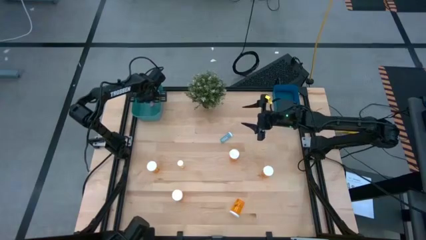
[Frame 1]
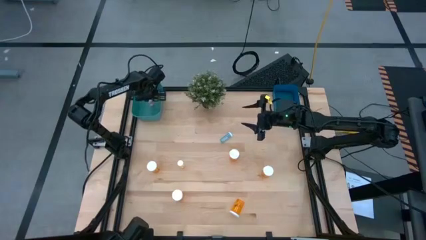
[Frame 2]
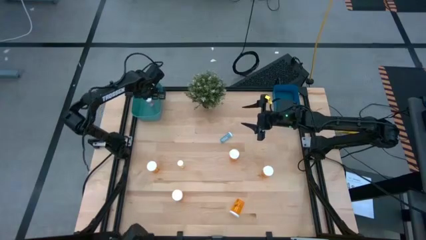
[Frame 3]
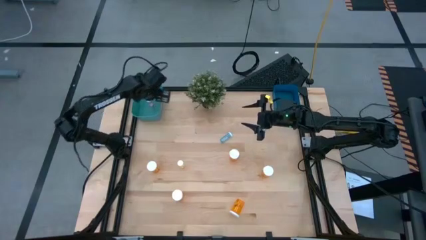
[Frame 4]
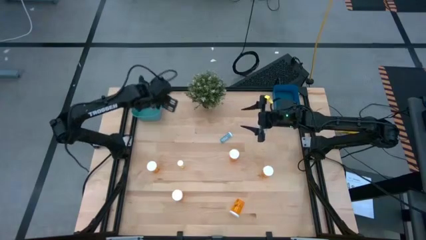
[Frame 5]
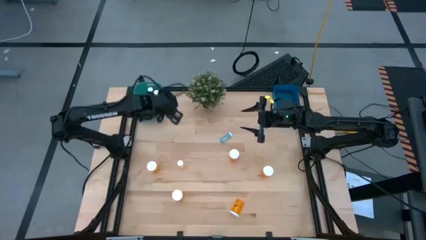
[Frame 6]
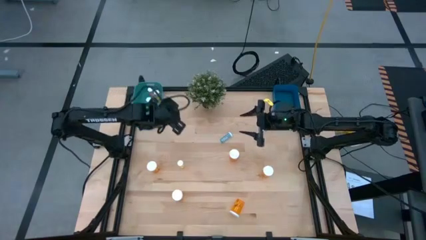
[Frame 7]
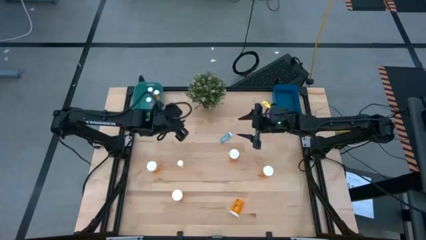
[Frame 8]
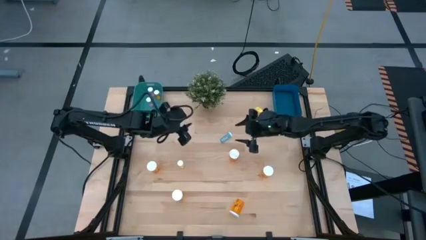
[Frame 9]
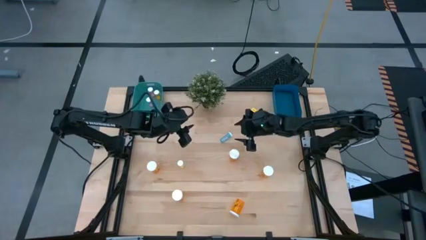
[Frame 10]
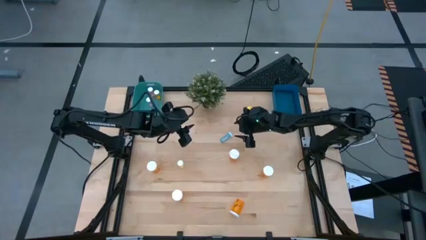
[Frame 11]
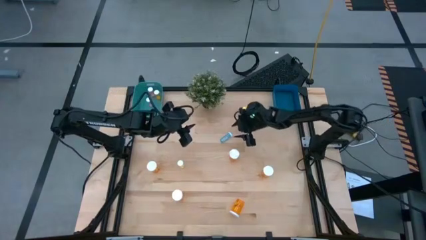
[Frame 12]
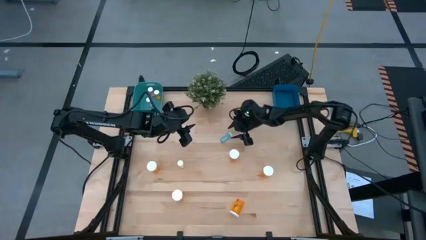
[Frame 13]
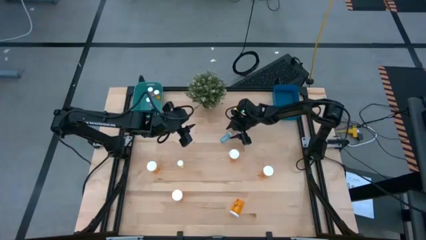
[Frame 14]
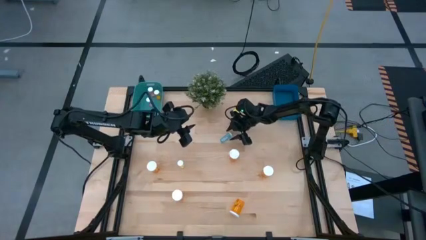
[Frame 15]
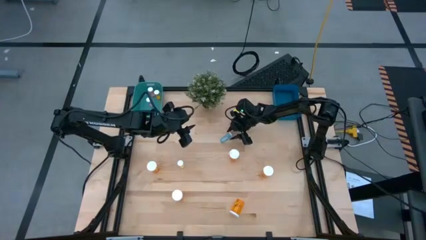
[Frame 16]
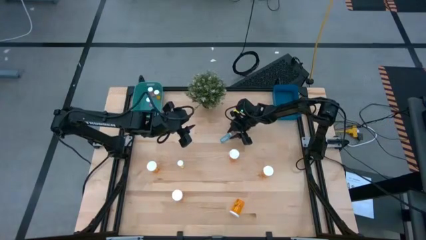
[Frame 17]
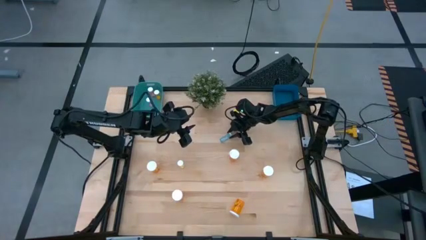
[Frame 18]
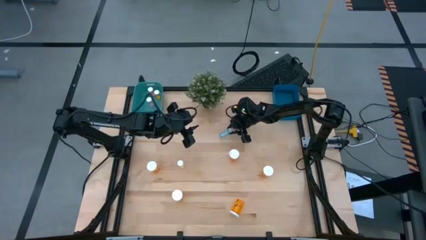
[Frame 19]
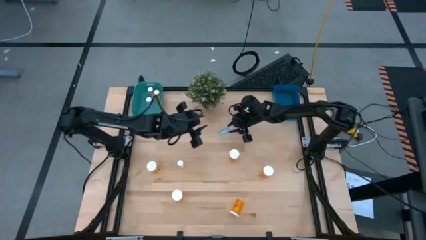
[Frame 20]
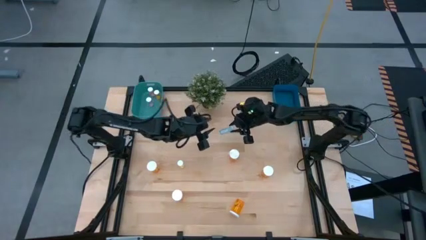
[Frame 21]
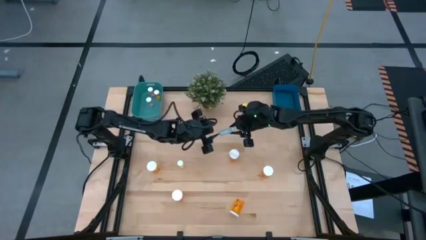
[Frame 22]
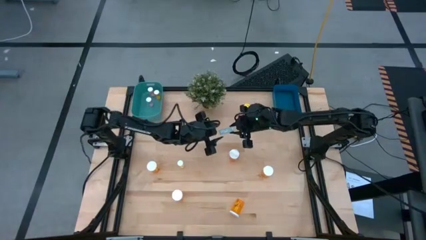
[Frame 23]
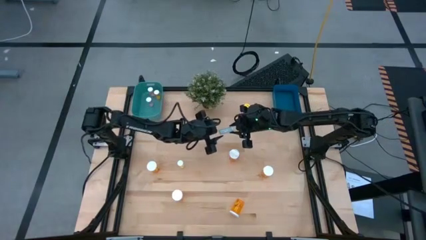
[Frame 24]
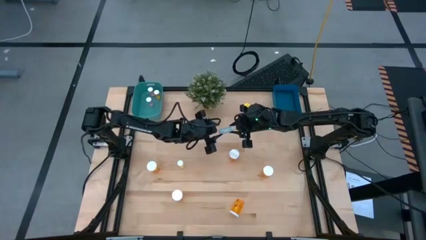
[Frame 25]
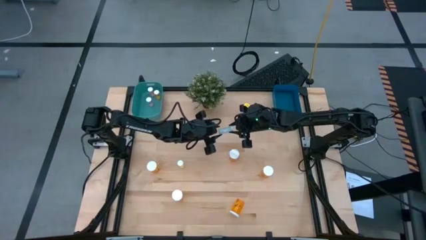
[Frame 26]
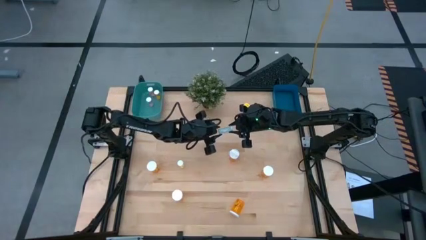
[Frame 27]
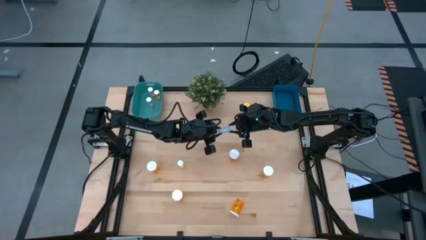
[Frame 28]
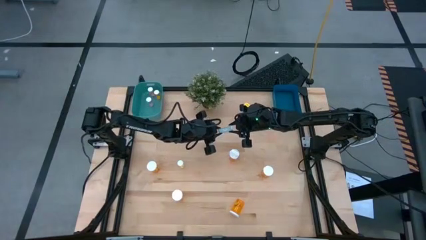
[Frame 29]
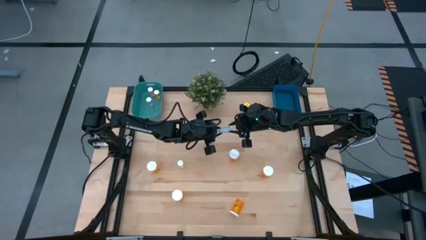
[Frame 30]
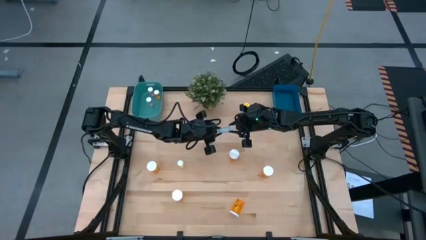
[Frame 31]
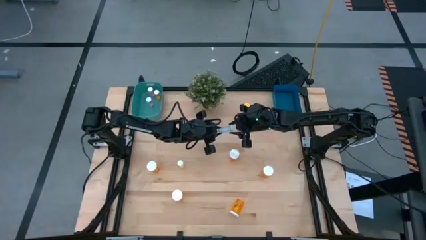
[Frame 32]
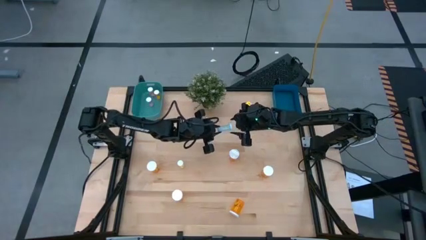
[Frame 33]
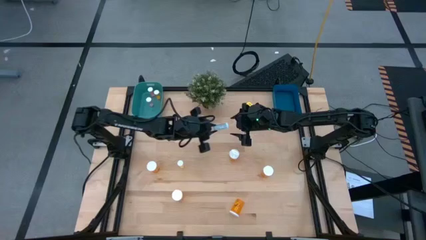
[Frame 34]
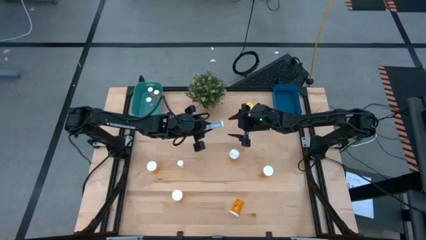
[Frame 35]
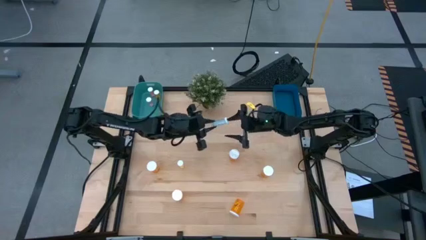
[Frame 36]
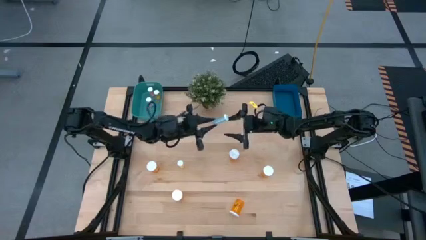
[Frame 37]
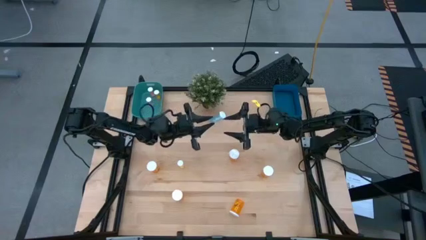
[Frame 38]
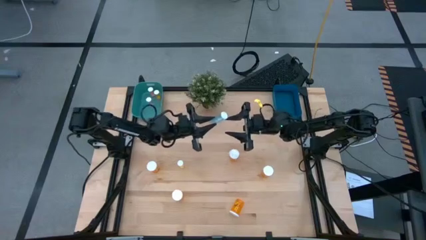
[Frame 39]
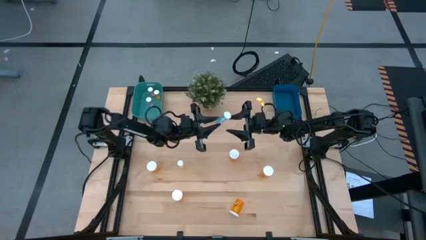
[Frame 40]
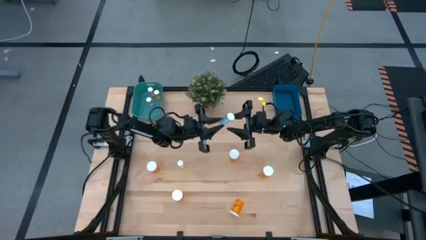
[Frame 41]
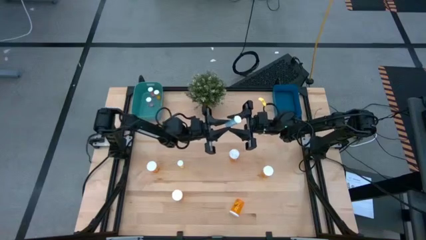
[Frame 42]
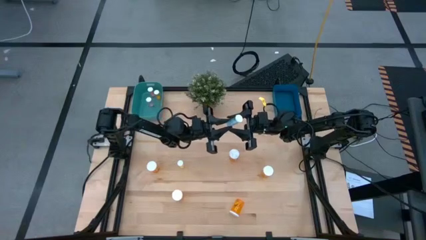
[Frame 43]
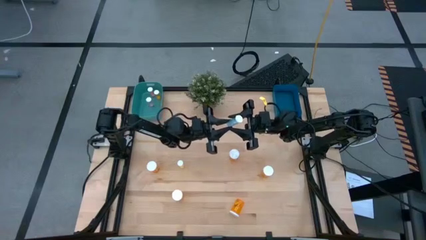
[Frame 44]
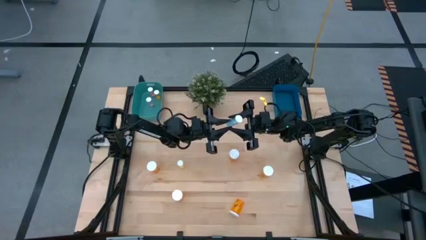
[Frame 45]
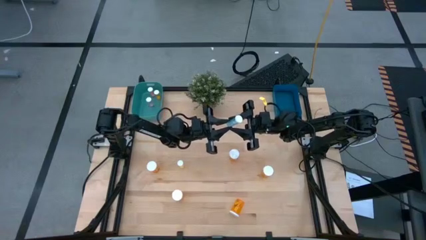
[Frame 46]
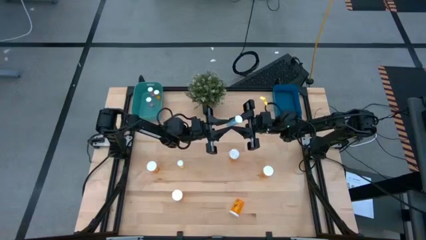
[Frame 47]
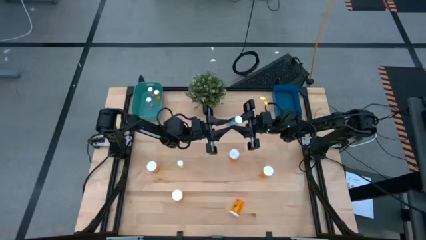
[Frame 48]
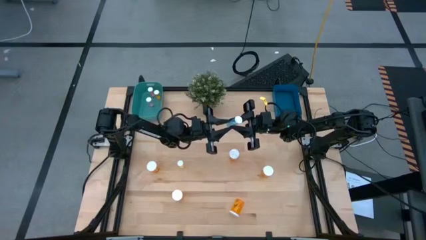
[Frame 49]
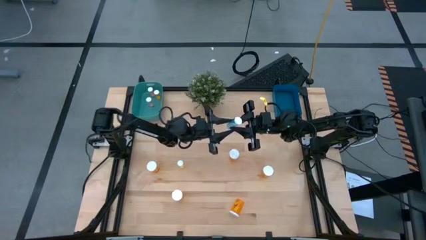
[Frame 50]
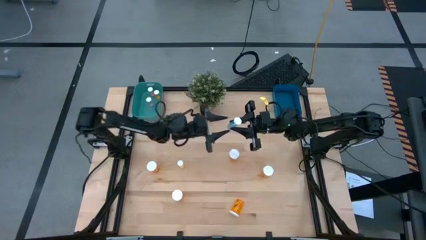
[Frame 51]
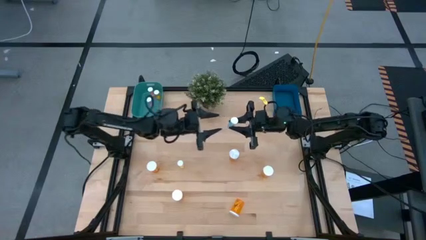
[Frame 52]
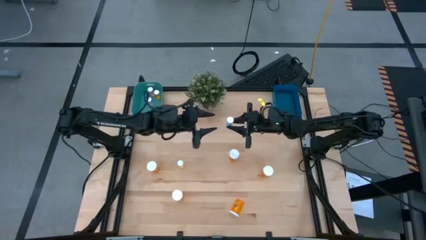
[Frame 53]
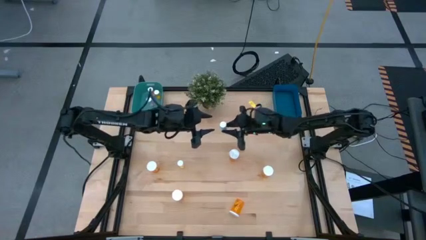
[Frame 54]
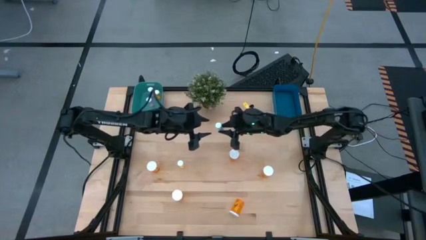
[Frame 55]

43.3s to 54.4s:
Task: Pick and place medicine bottles into bin by pill shape (circle, oval)
Put the blue pill bottle into the green bin

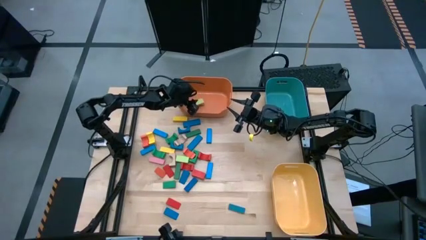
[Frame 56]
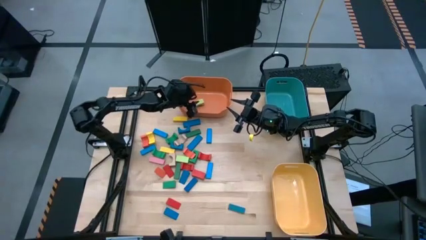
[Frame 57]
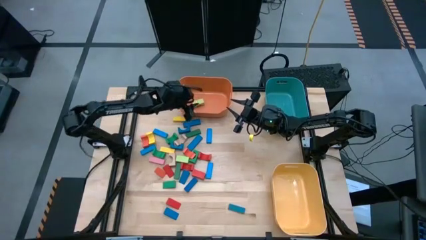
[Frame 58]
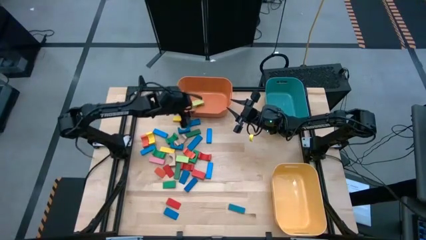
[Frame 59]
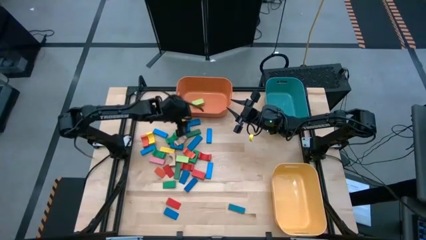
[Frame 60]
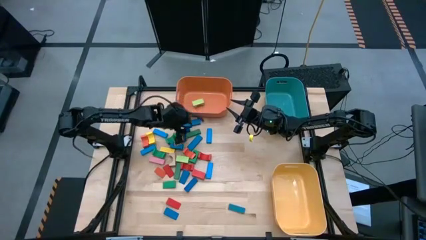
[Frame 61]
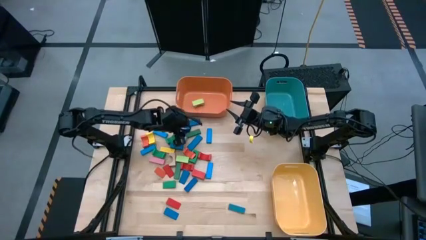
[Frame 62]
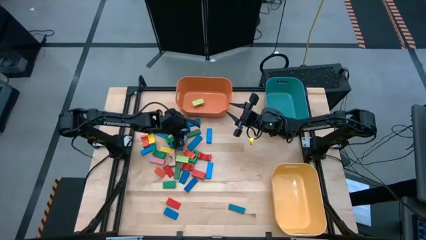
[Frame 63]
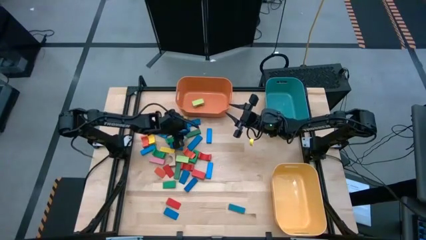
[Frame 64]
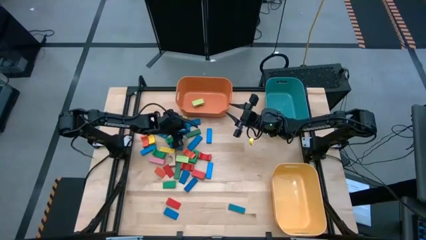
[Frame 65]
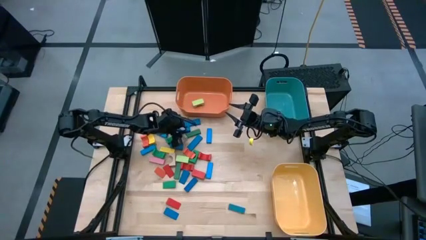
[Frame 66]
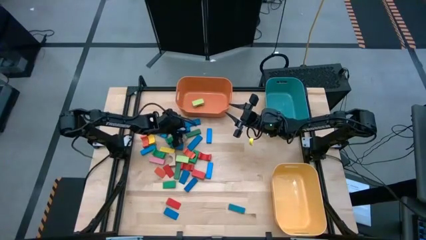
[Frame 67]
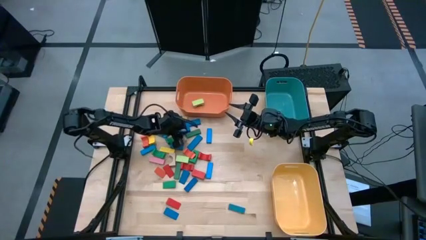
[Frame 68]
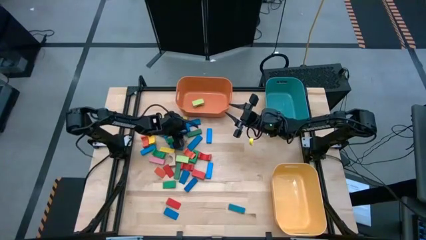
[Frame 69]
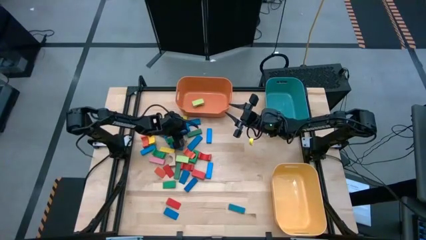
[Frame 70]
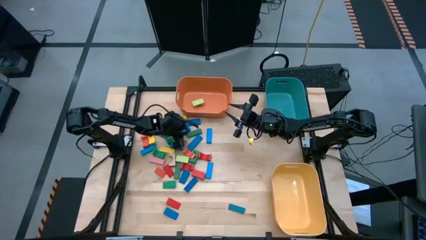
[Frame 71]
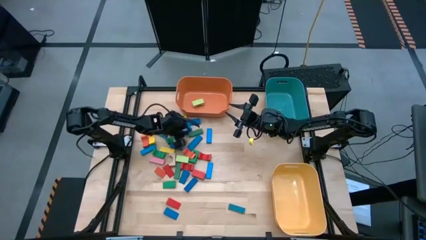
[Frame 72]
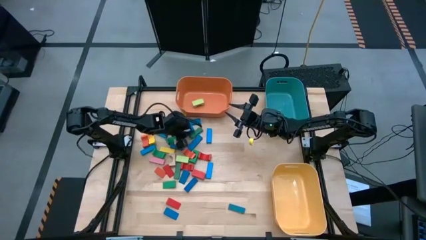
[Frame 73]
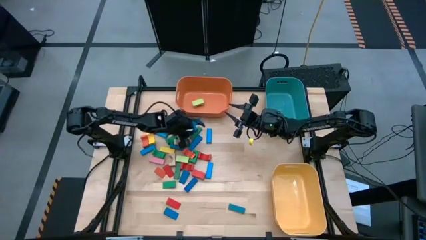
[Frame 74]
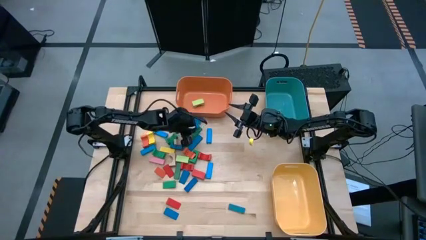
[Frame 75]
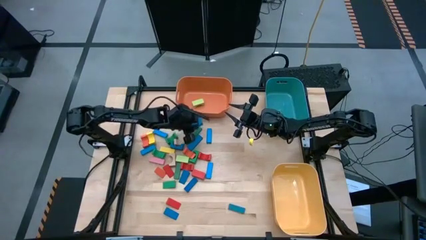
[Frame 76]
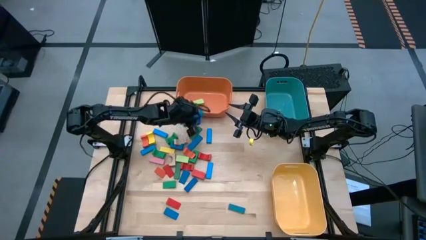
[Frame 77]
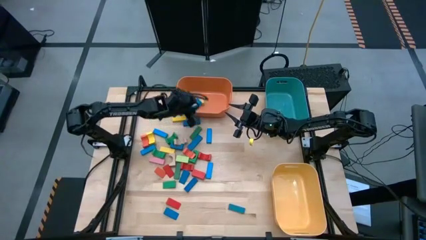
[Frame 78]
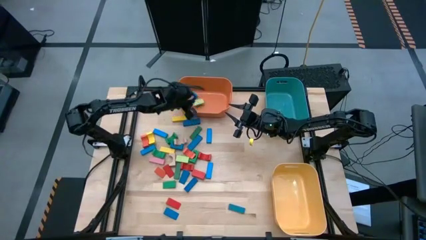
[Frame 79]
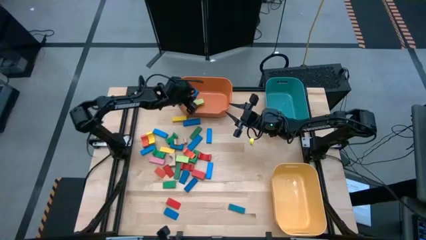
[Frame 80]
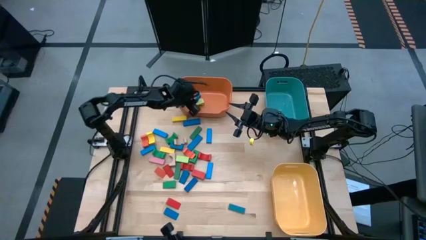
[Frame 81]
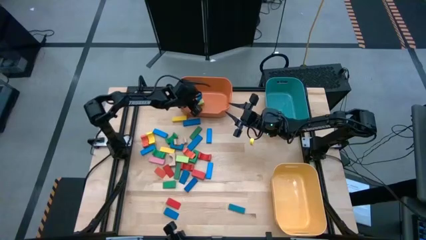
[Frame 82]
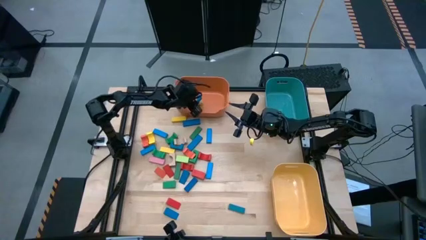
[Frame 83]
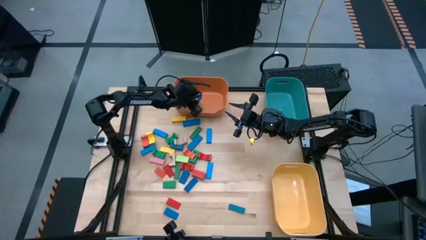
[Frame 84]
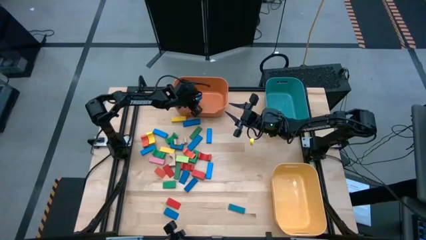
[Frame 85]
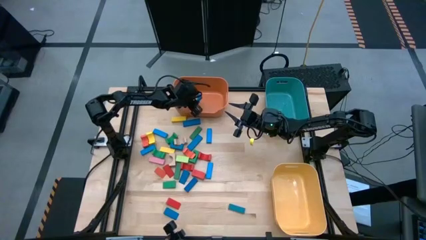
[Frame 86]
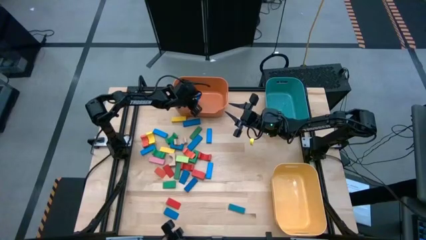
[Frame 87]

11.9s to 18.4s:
Task: Sort blocks by size
Put the blue arch block into the orange bin
